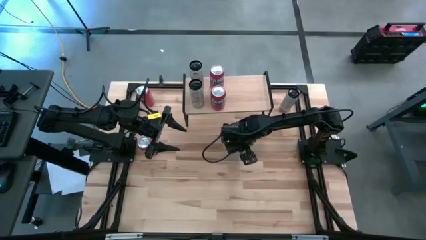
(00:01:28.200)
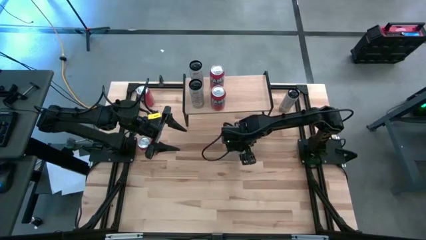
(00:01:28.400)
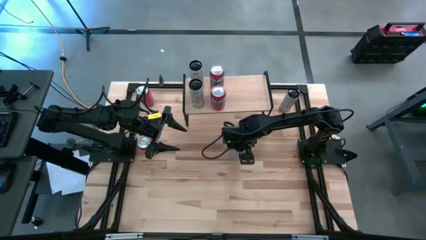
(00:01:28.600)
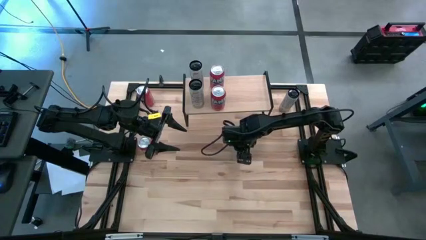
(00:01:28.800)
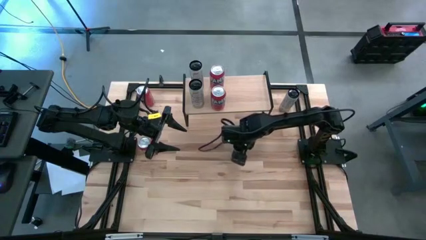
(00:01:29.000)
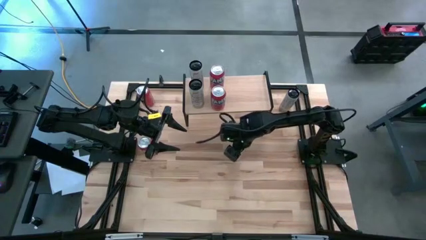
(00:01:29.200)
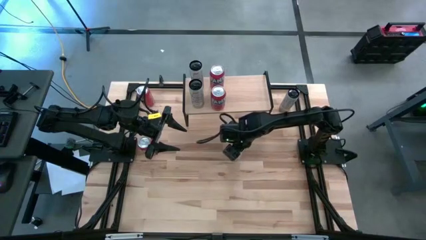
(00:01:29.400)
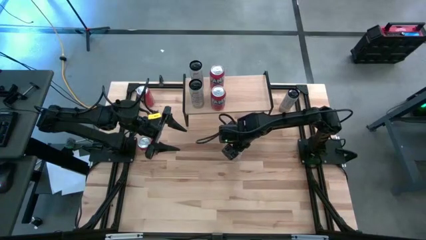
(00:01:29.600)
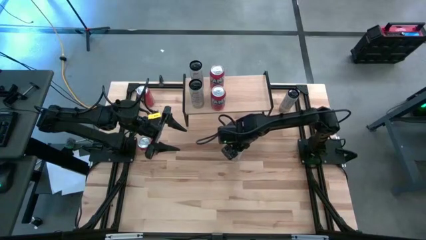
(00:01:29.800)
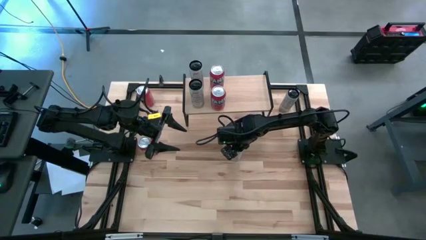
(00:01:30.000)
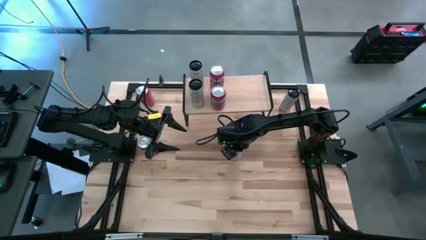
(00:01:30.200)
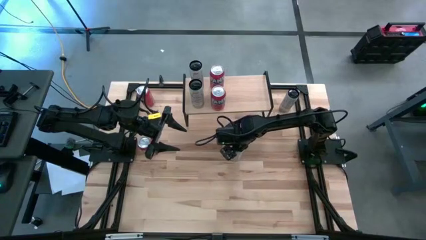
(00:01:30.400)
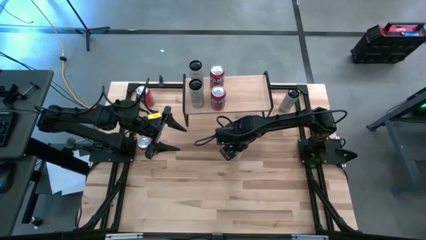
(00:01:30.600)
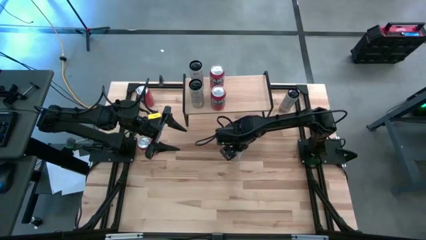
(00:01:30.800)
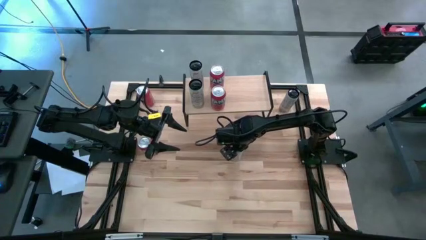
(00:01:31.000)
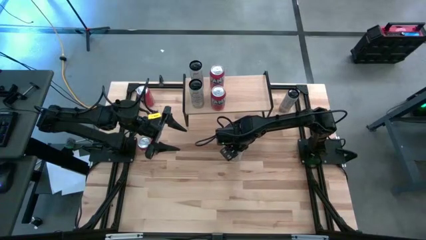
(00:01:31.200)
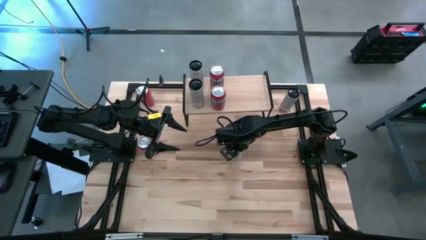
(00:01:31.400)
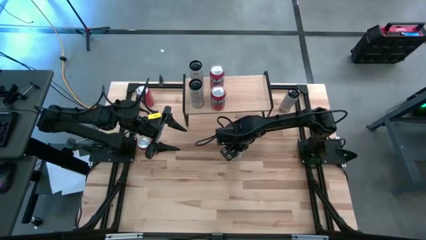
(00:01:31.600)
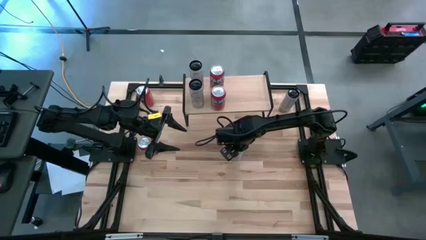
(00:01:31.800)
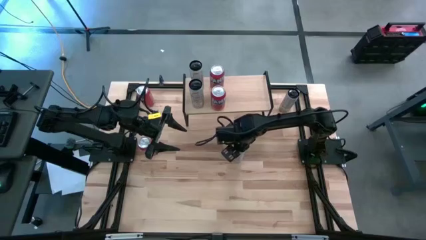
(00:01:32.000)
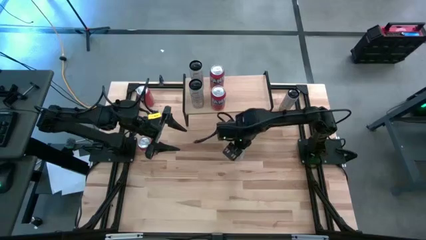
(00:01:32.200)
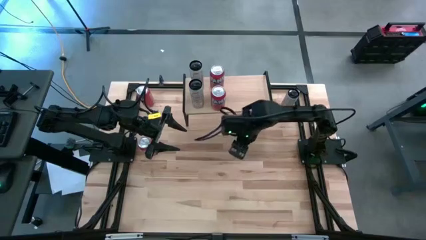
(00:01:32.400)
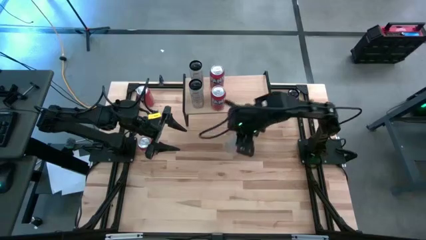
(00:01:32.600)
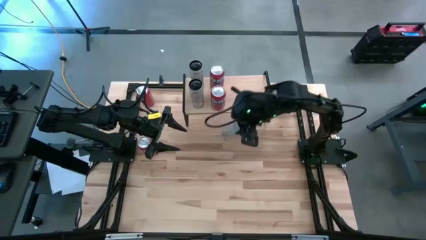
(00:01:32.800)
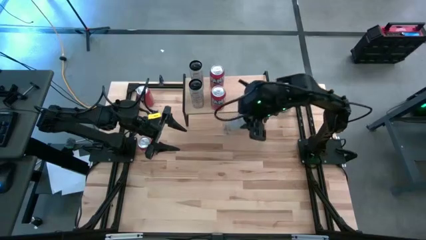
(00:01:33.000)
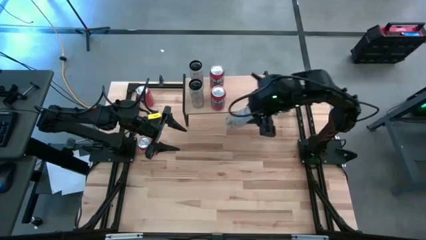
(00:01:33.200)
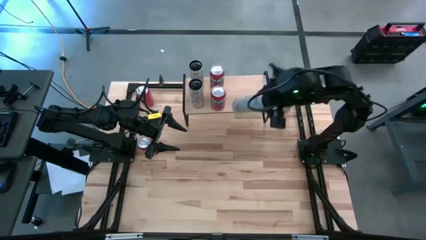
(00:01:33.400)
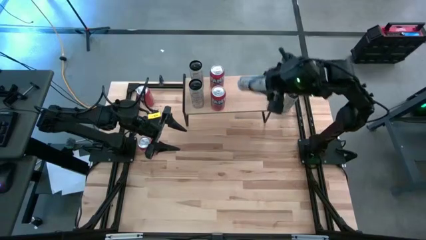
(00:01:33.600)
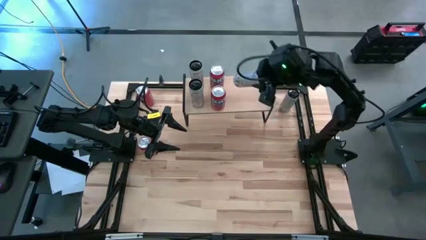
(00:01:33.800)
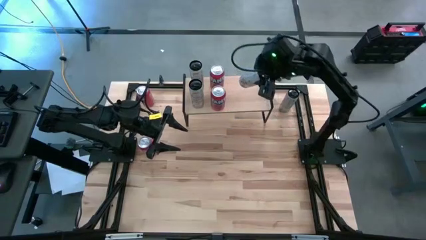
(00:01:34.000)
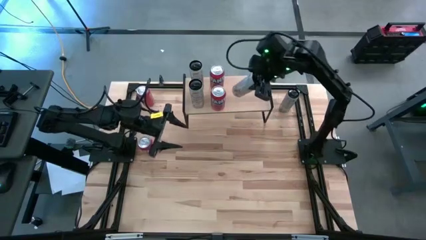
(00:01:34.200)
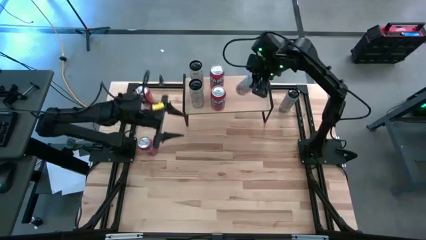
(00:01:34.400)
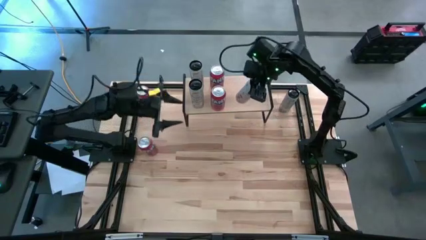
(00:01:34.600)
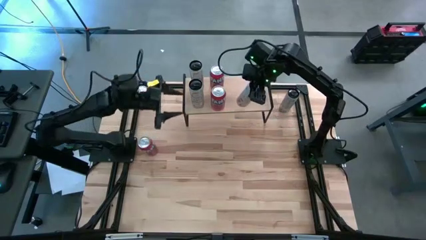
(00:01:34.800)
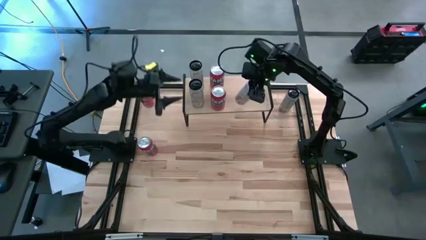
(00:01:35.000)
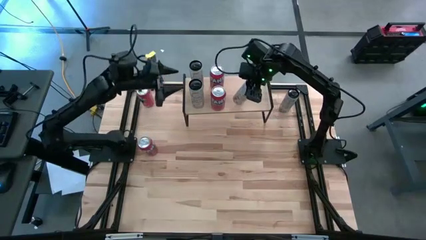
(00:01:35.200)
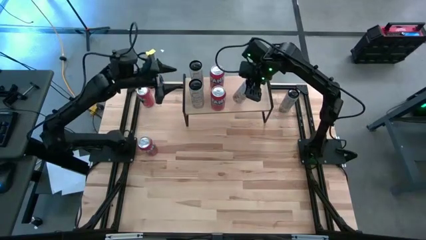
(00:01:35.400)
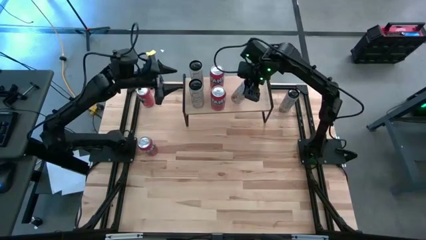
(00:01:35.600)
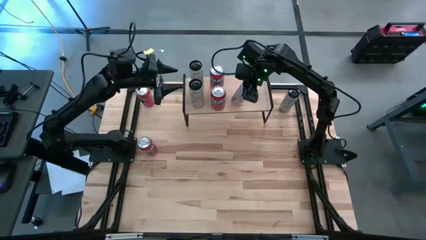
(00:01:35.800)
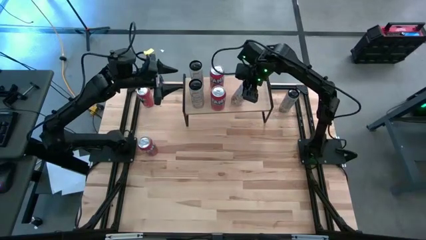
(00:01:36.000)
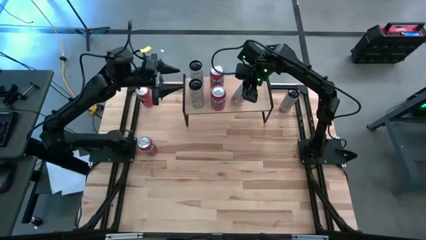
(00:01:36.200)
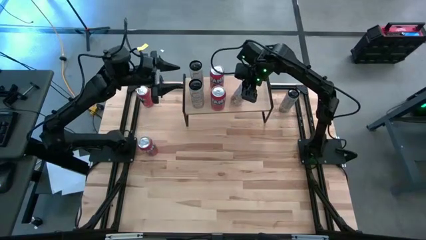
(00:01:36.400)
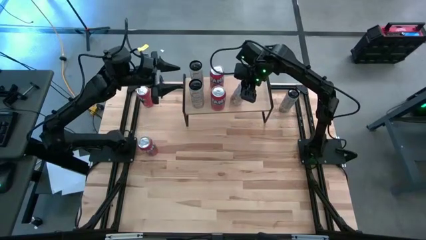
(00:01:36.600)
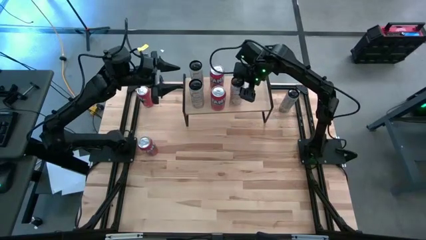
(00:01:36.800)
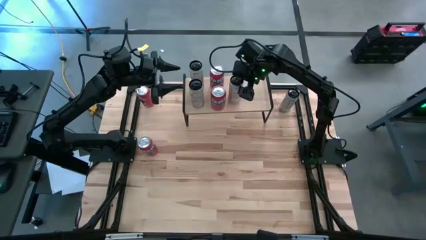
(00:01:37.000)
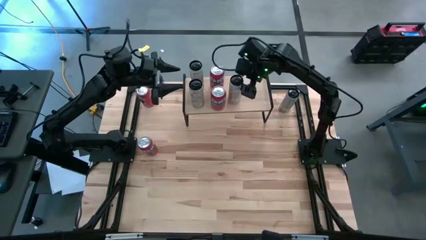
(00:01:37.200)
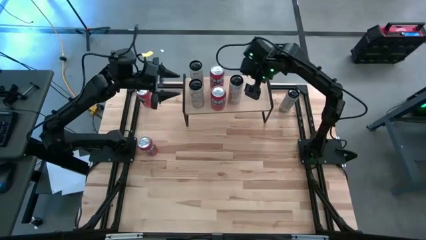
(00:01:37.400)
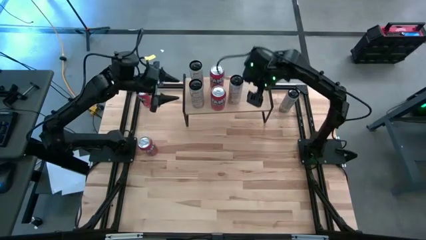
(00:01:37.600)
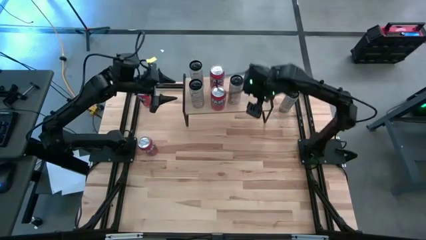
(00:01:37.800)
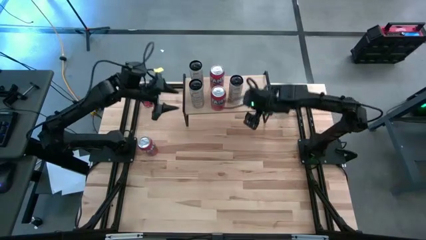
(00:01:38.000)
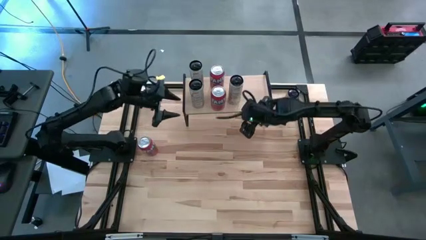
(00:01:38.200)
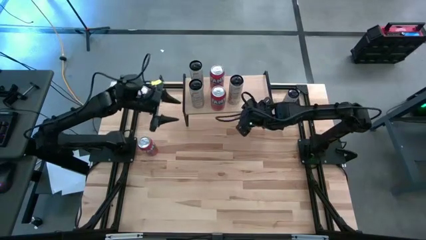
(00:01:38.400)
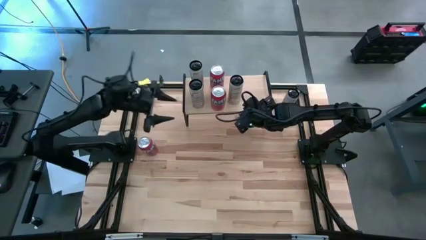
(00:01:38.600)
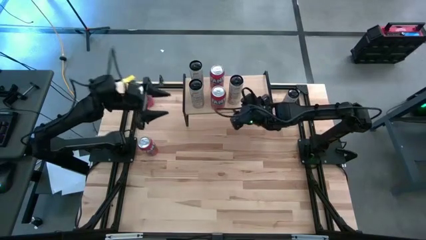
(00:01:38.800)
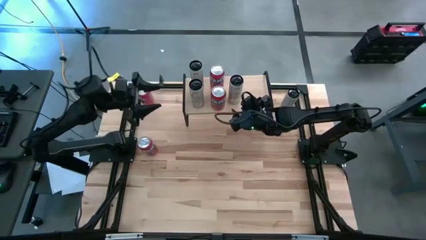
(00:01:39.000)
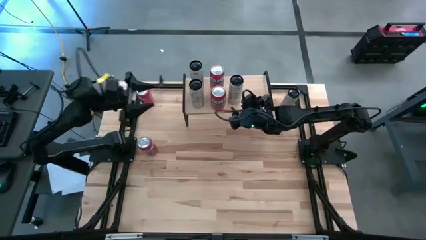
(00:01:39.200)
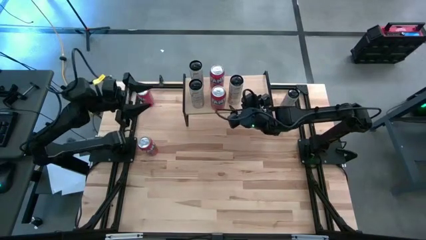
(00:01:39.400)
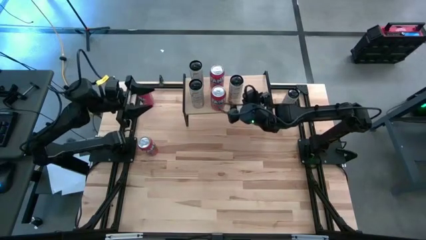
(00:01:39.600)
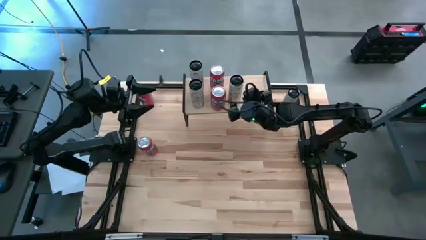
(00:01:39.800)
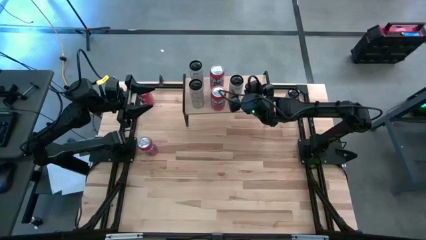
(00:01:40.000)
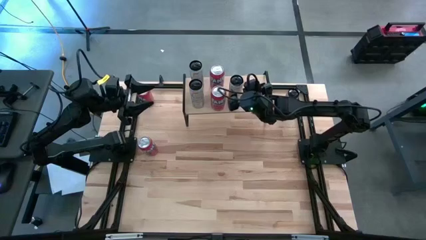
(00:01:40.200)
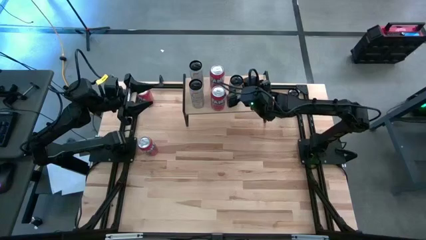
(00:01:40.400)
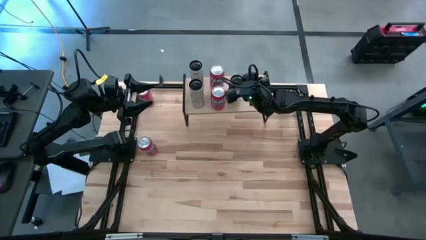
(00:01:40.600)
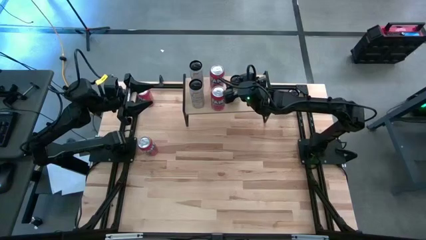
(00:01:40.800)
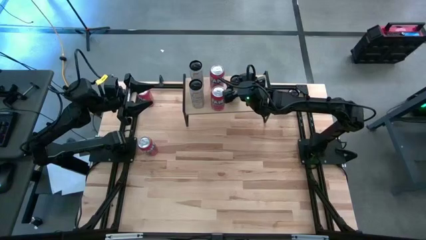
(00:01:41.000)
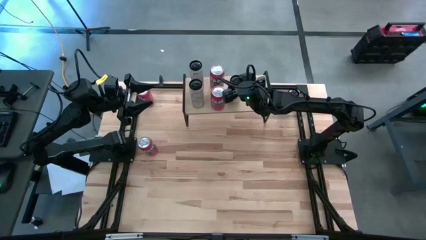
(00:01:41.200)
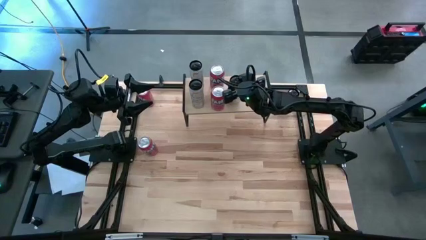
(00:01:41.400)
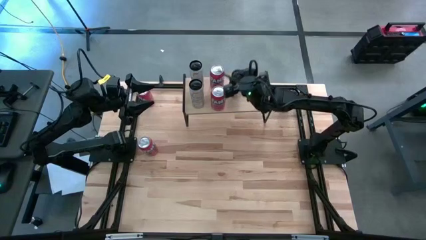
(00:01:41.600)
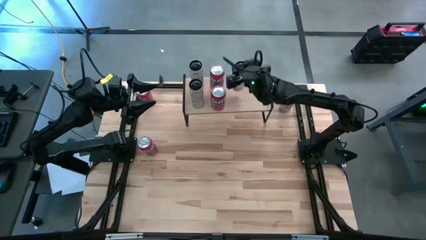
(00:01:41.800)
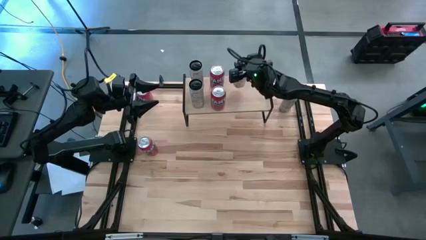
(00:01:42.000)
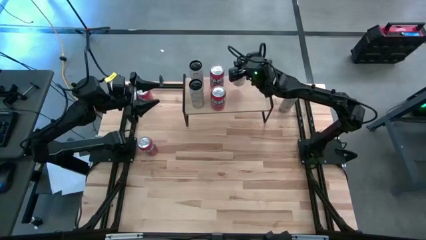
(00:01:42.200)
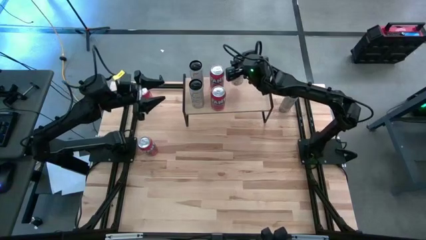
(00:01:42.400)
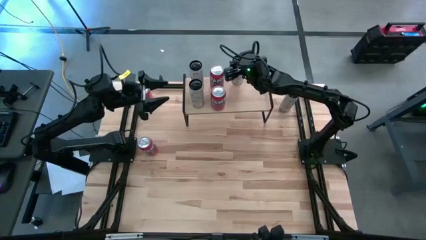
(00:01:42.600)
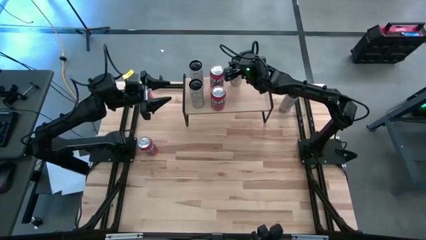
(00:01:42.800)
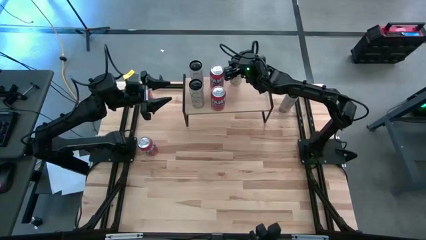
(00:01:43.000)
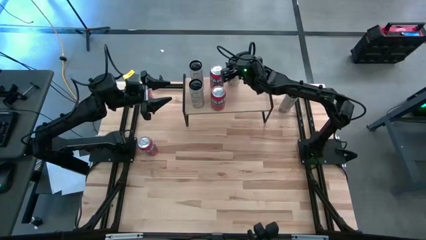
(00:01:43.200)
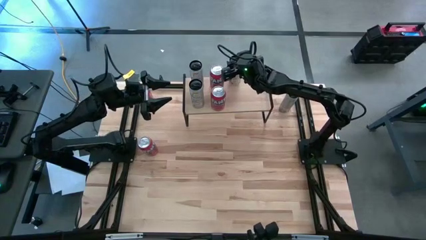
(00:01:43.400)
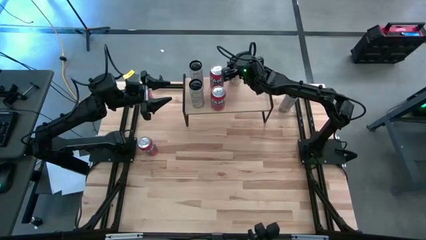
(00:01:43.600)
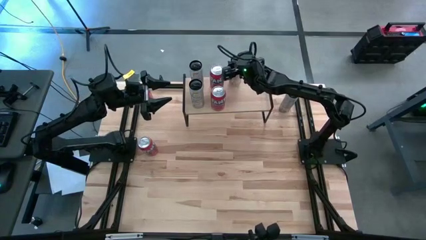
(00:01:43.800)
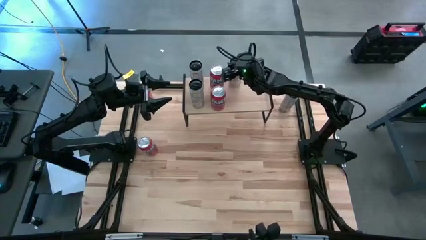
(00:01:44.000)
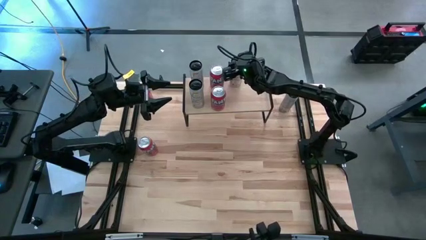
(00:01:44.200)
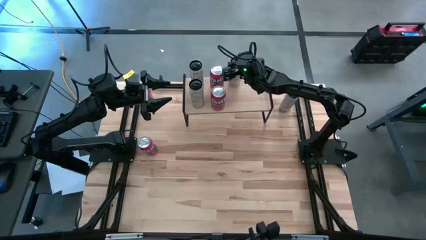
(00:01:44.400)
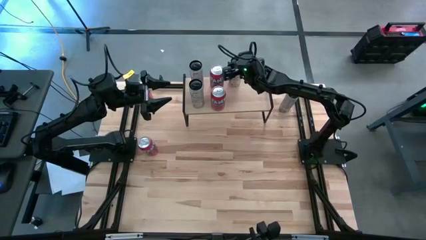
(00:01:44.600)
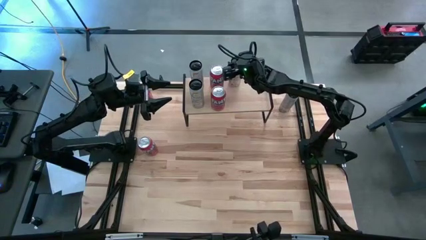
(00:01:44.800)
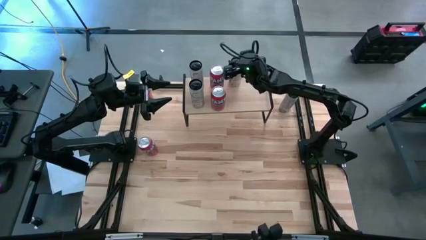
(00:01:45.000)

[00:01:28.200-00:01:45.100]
Task: Place canned beverage on shelf
Put the white yellow soda can on the shelf
